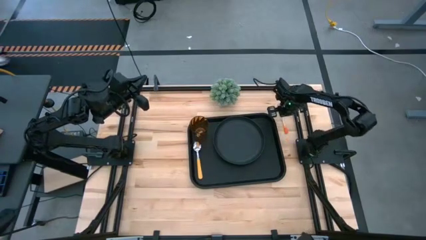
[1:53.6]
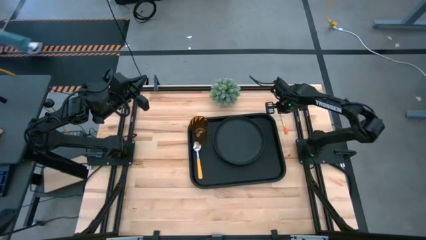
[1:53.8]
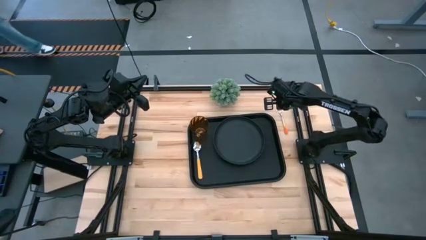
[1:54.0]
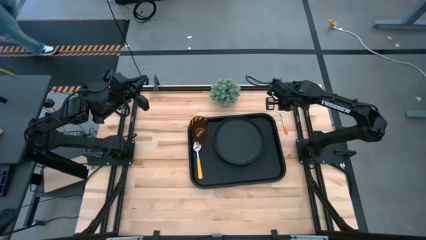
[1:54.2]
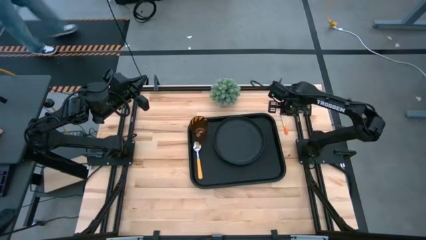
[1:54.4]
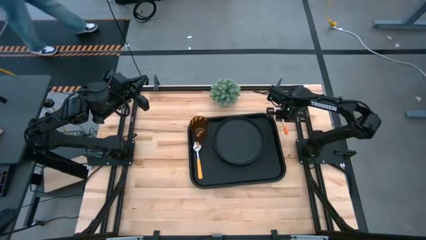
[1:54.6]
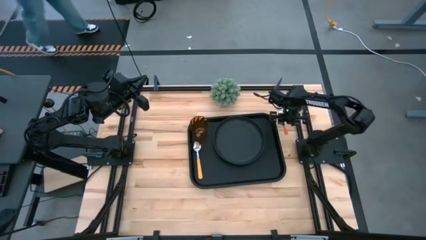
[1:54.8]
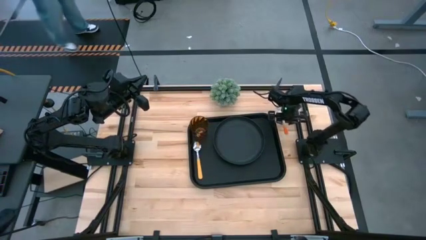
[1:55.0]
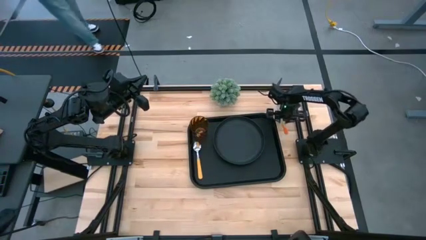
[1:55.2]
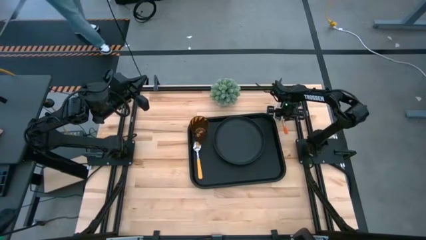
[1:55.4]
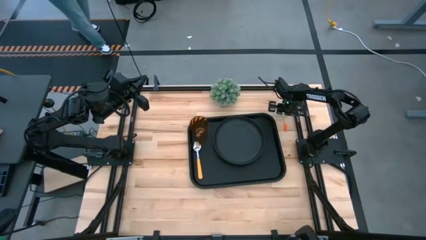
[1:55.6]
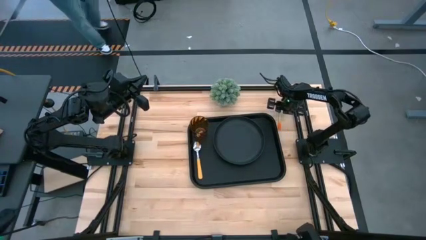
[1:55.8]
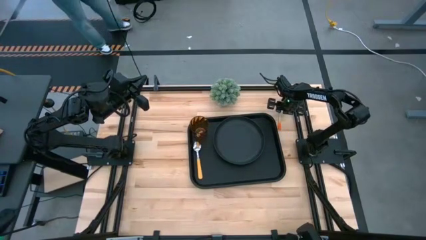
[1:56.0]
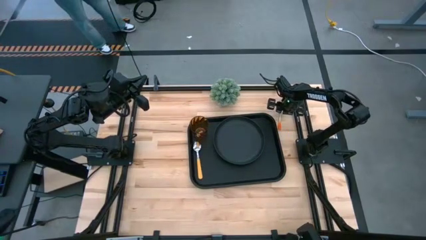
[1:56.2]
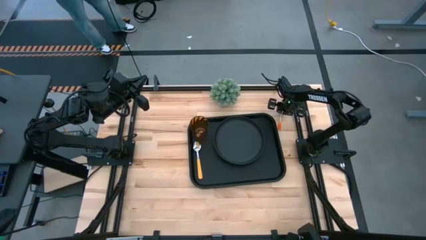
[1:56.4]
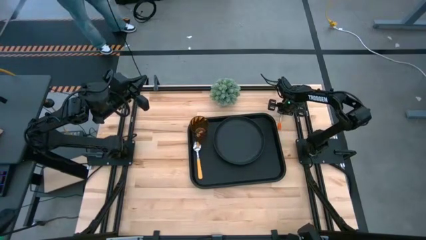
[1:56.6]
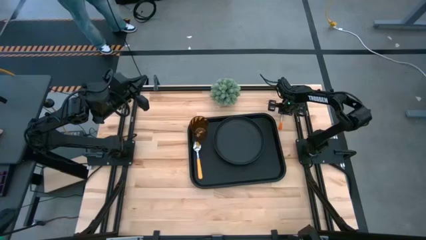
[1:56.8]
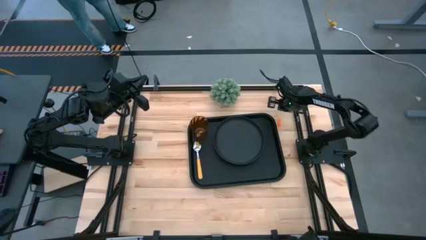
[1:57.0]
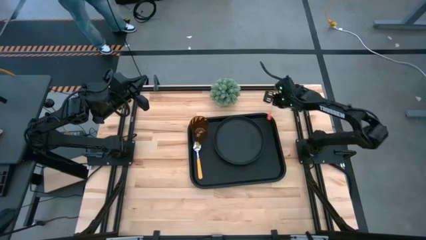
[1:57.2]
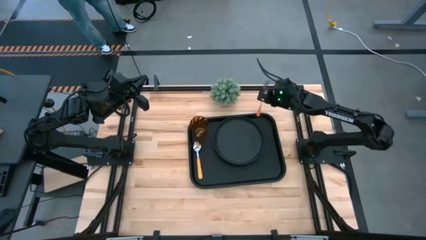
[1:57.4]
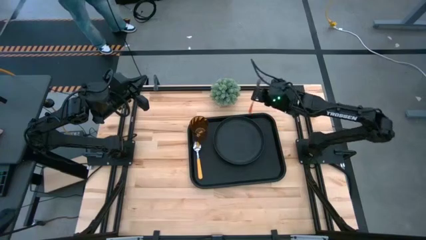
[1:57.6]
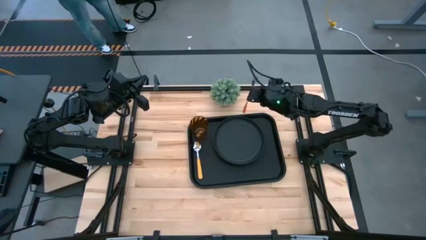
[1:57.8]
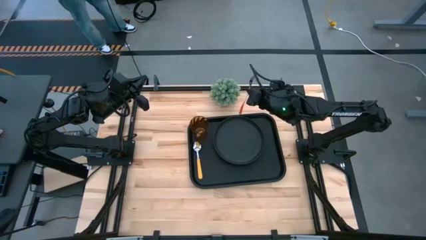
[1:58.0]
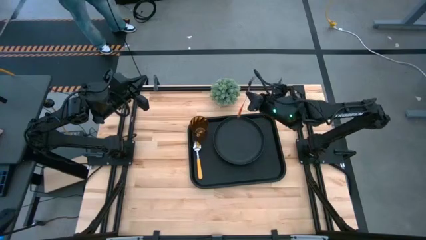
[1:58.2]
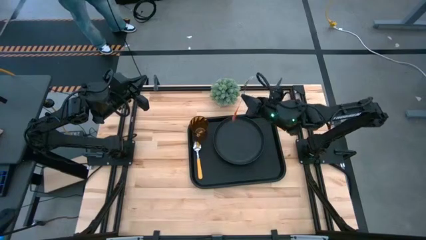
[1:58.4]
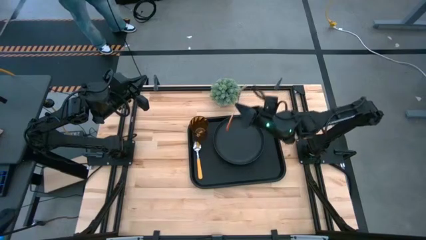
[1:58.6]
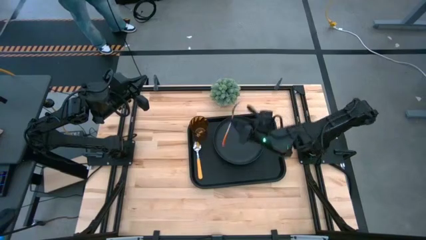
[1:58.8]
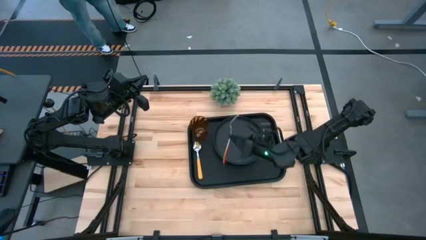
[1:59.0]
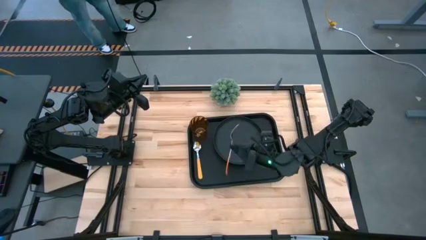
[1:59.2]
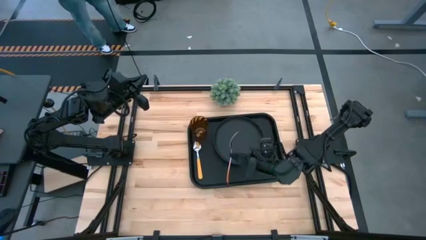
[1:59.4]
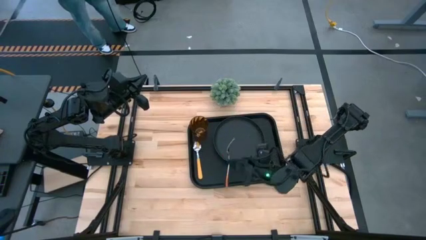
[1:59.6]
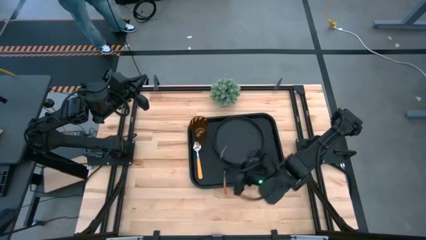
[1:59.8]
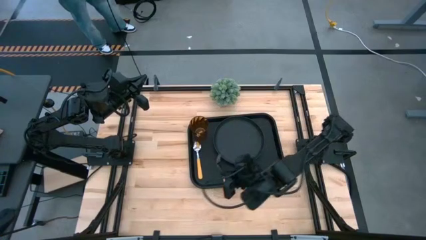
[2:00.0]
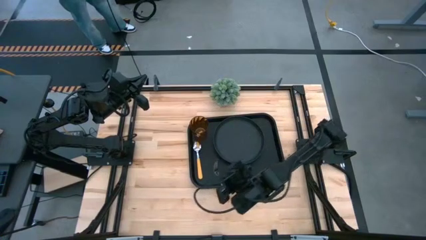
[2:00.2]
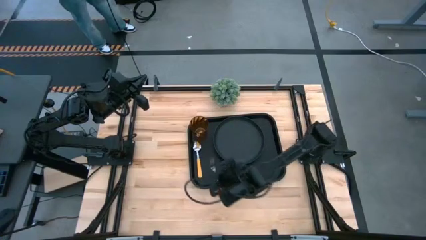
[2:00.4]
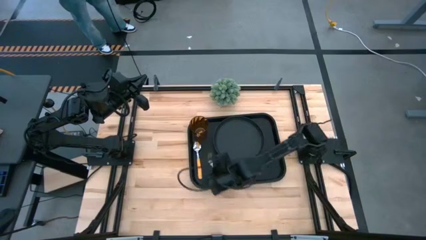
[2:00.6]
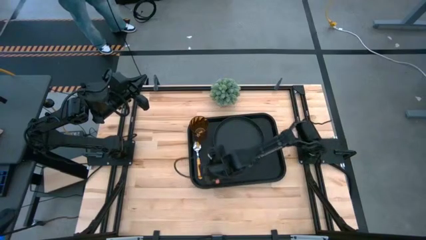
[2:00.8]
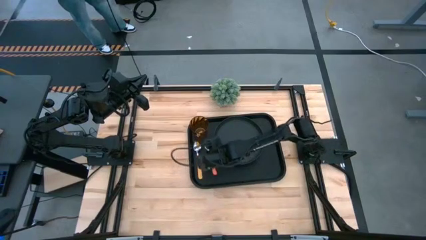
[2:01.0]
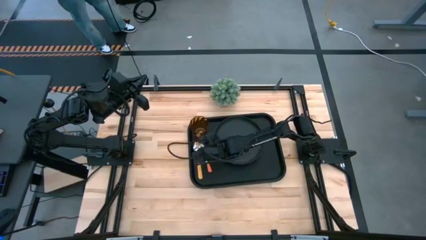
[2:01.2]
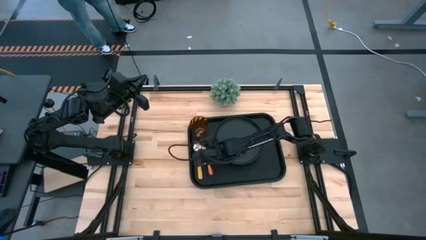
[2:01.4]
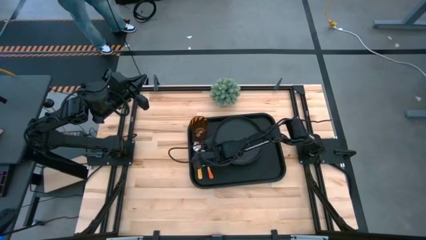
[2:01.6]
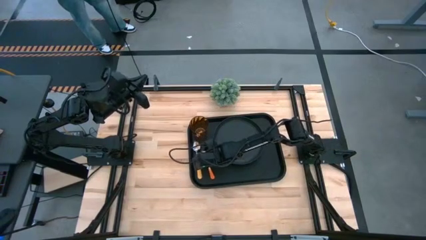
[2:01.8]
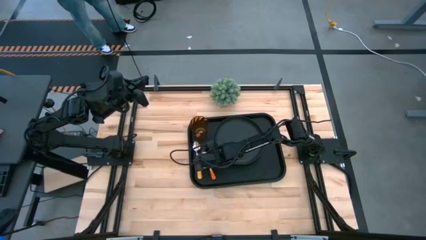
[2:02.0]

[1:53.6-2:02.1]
Task: Pick and place plate/cup/fork/spoon on tray
Put the orange fork on the black serving tray between the orange spoon and the black plate

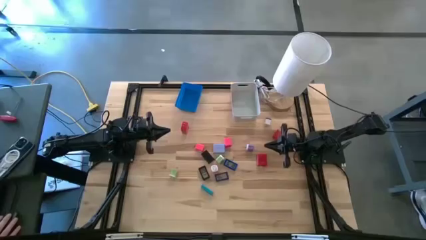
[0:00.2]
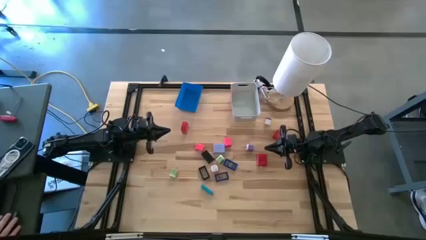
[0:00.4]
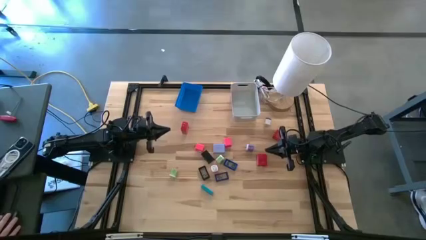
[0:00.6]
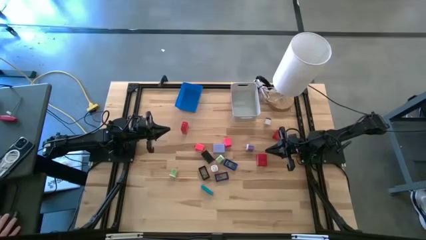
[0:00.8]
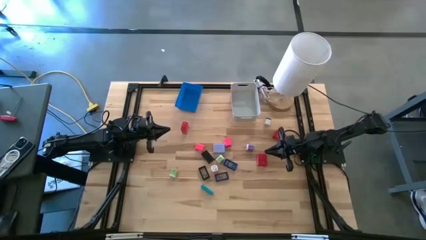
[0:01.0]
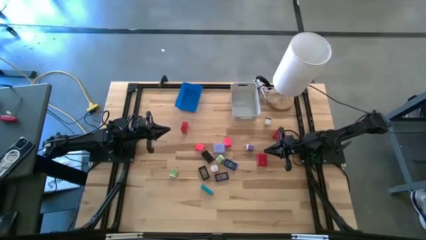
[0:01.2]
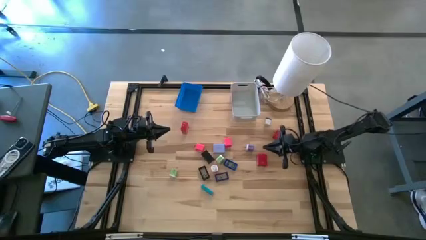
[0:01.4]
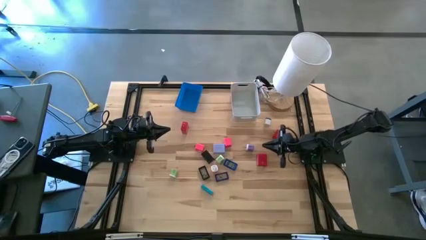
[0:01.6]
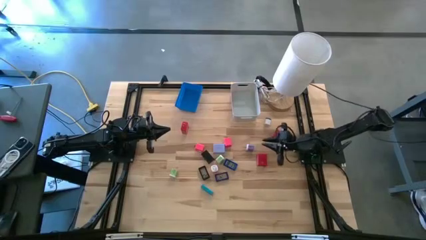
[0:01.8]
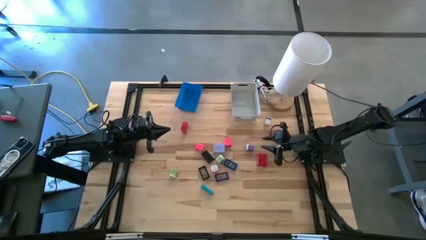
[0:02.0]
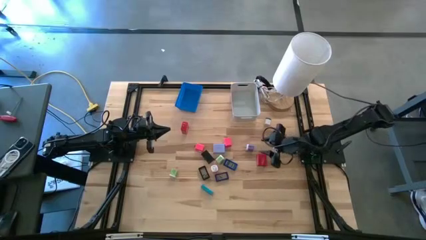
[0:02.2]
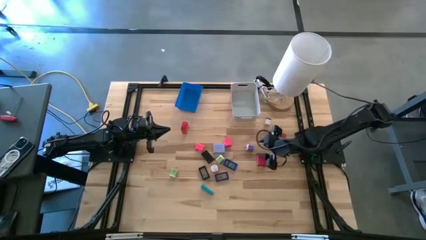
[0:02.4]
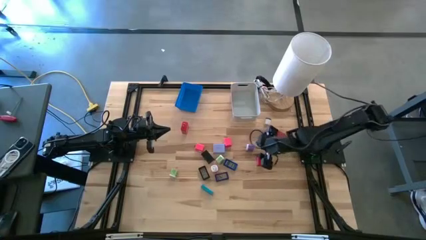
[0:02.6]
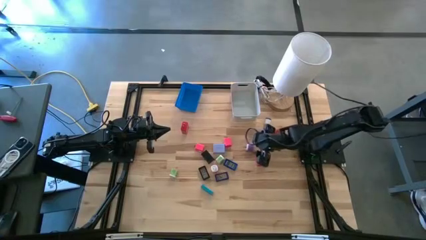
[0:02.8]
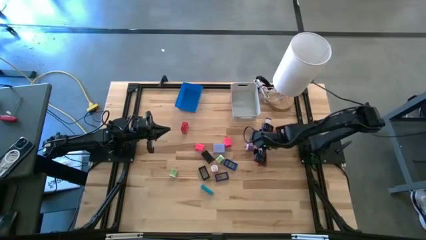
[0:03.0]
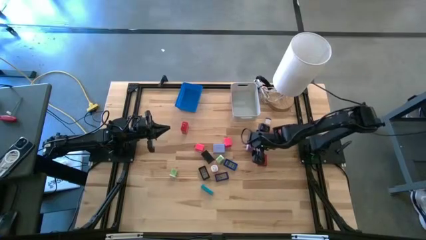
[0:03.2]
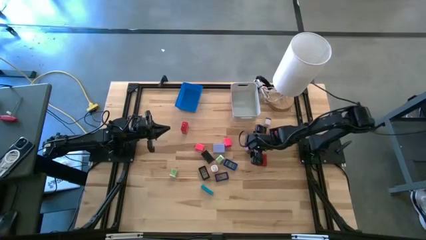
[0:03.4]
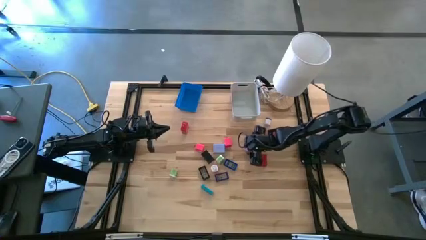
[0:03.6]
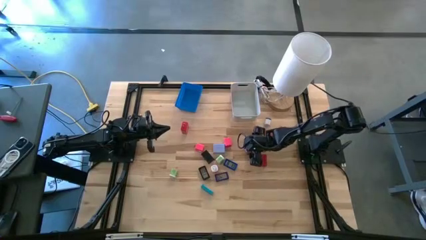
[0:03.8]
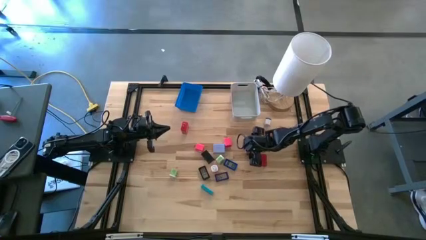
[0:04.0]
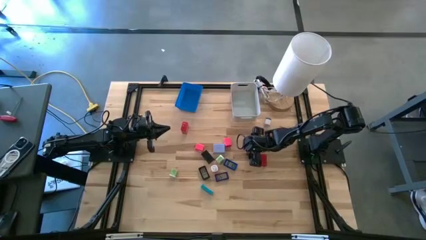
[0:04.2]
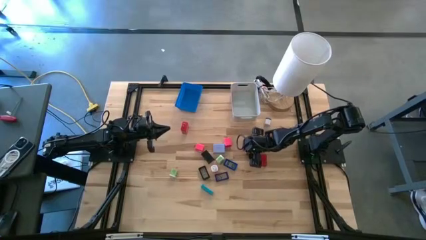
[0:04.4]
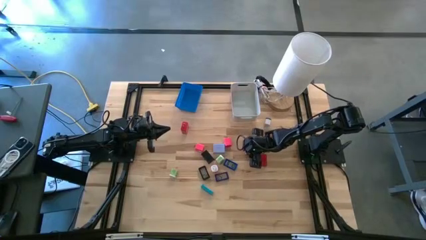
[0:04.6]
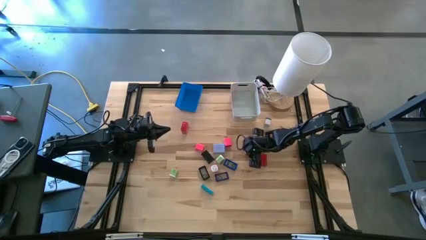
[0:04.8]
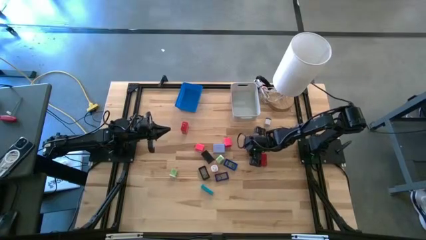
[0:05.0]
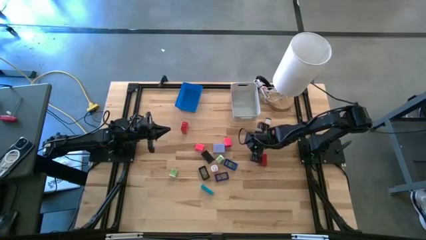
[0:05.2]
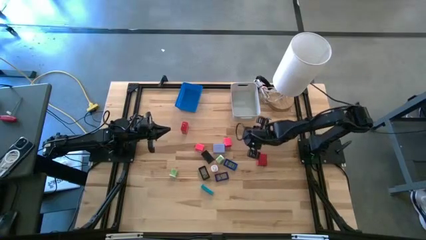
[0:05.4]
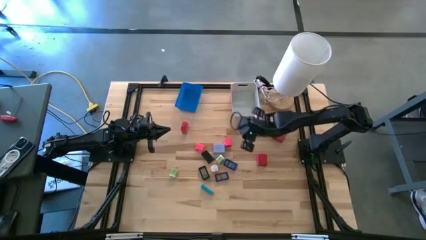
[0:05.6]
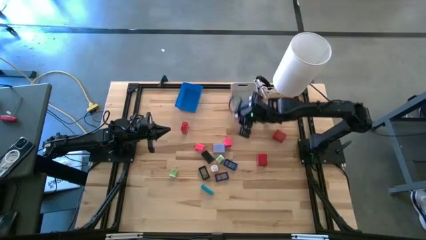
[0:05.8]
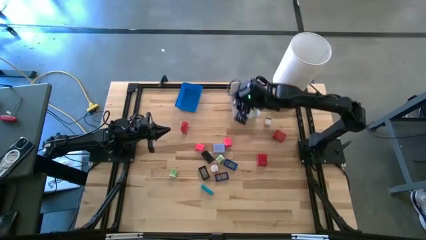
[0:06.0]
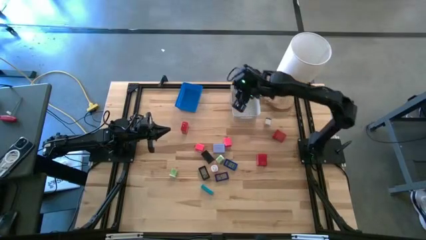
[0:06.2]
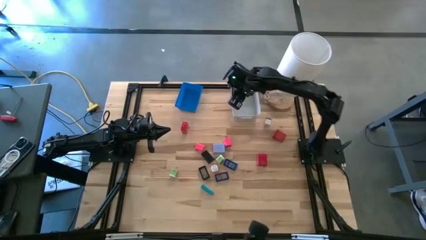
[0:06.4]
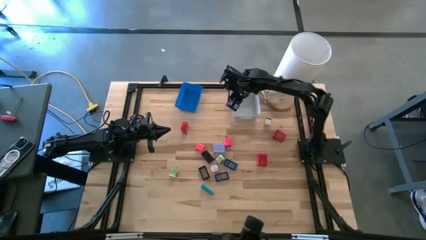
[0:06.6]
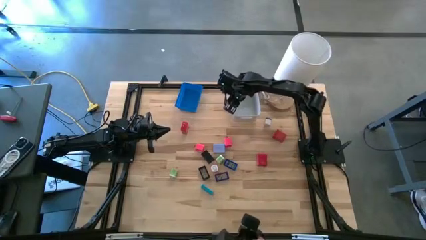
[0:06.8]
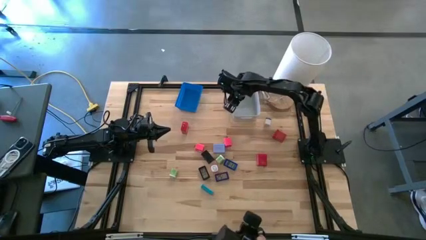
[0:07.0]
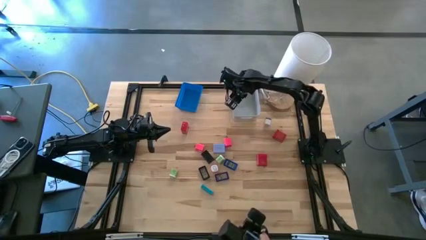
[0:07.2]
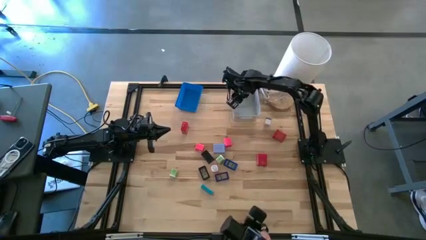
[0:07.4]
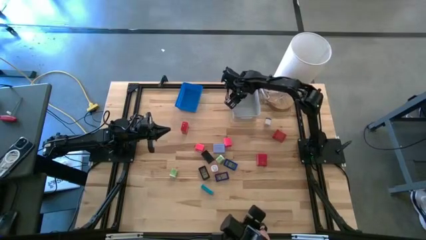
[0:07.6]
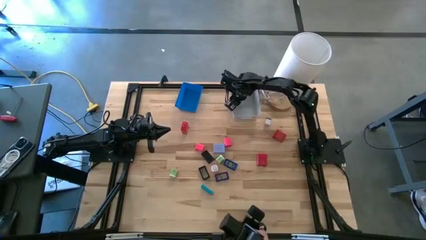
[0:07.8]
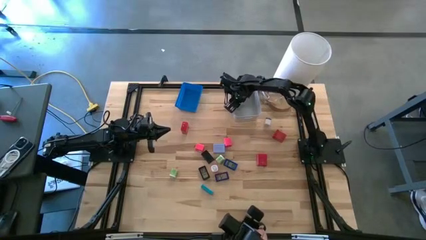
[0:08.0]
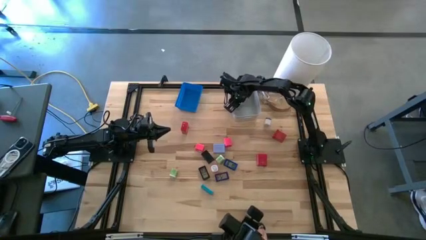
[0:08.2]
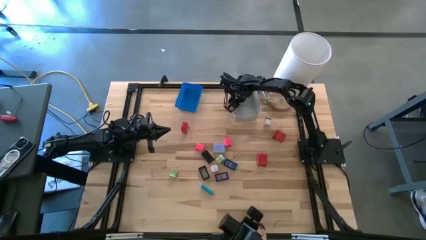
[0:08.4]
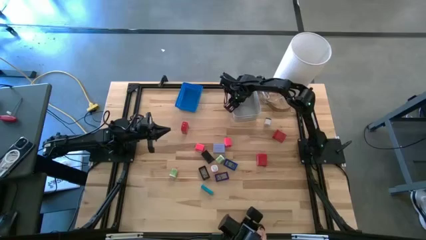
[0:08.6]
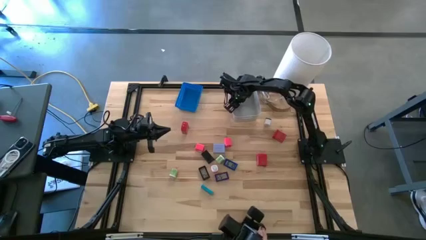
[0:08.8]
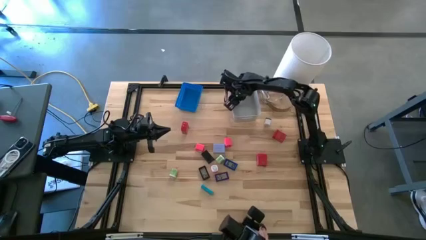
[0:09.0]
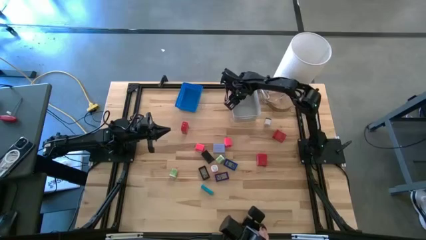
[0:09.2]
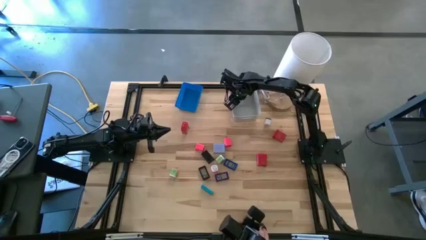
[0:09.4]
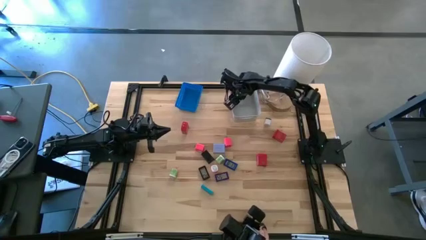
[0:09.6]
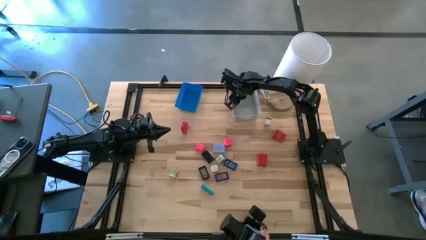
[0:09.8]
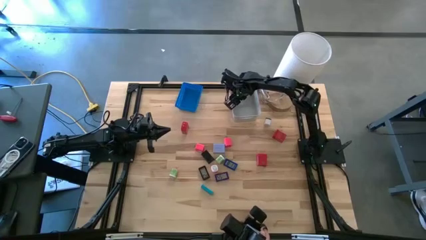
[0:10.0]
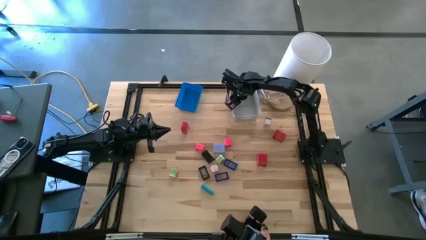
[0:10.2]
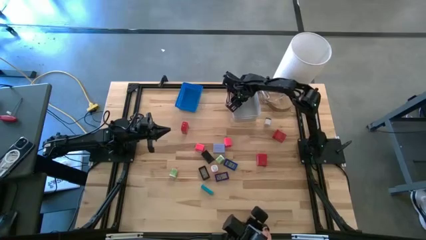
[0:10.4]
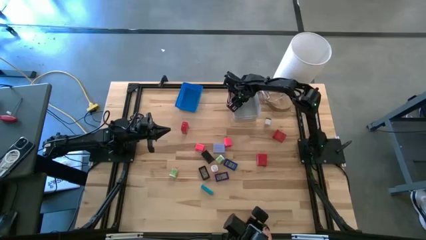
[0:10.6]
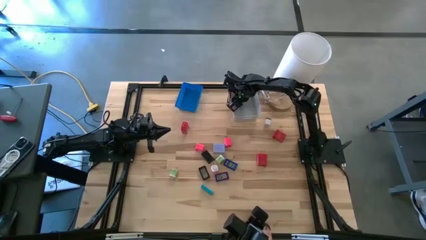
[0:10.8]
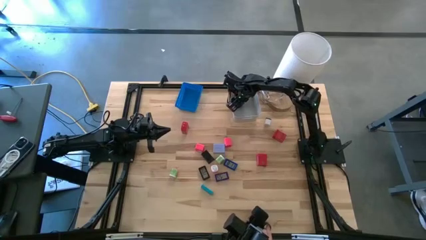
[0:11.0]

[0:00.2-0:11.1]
Task: Pick & Place Office items
Put the purple charger adapter into the white bin
